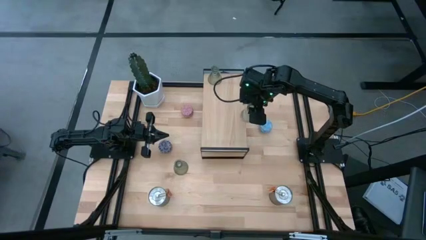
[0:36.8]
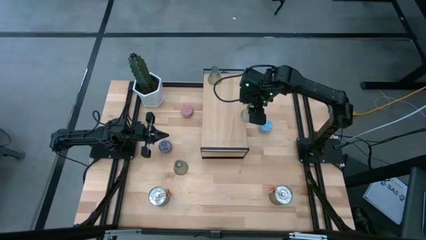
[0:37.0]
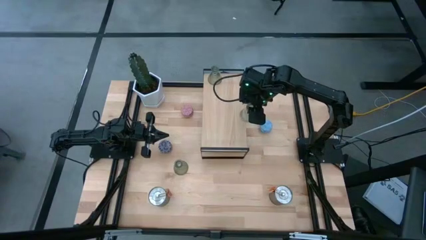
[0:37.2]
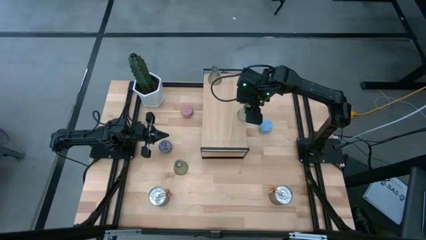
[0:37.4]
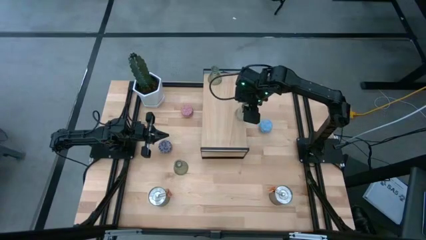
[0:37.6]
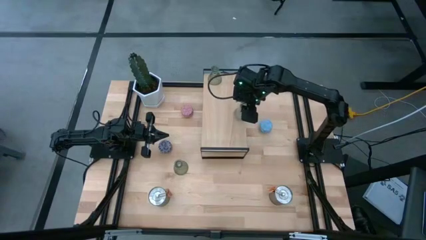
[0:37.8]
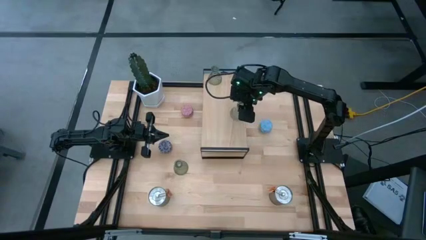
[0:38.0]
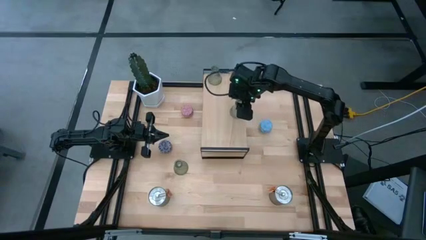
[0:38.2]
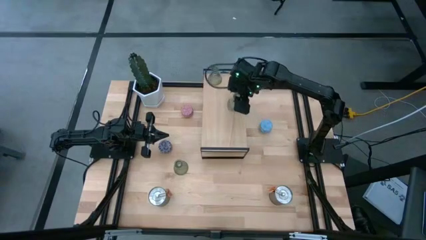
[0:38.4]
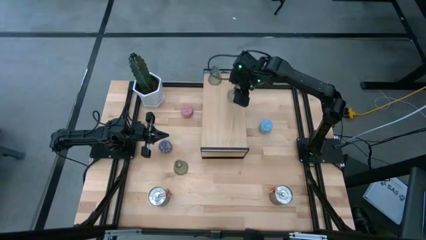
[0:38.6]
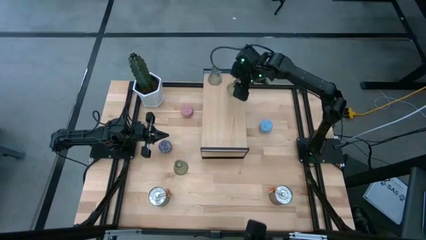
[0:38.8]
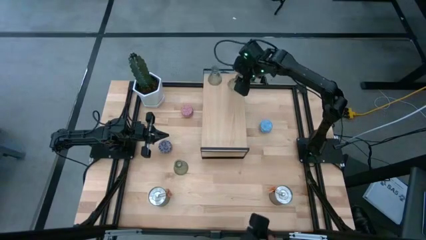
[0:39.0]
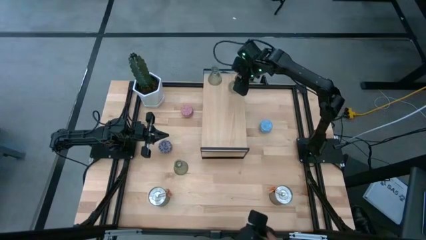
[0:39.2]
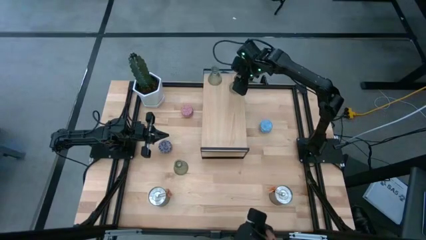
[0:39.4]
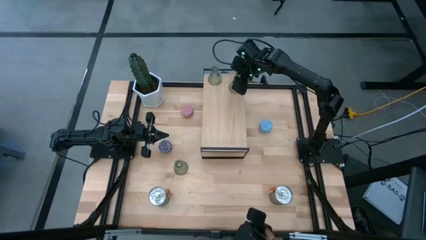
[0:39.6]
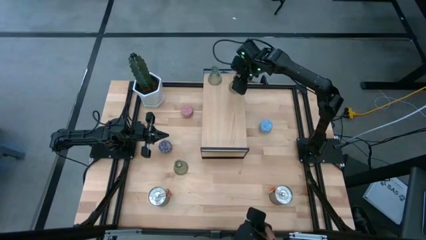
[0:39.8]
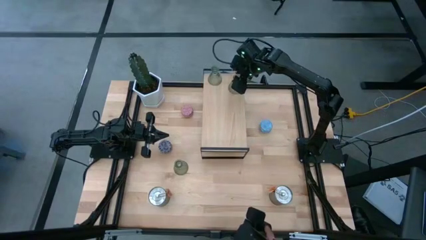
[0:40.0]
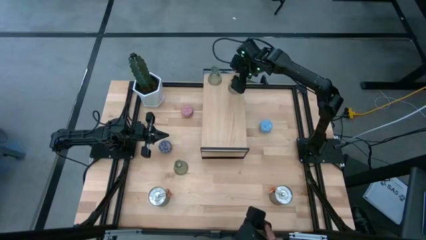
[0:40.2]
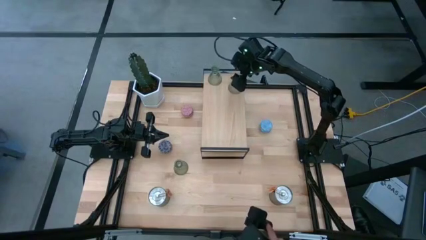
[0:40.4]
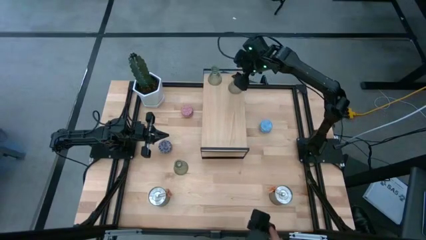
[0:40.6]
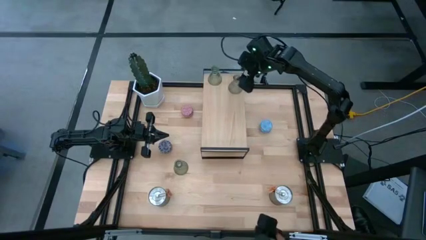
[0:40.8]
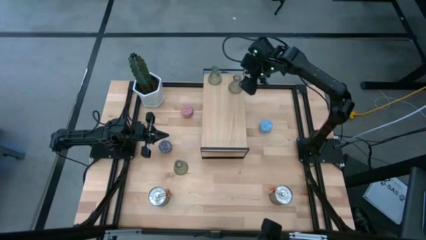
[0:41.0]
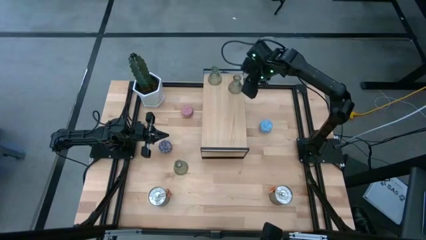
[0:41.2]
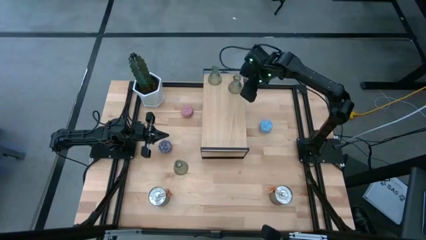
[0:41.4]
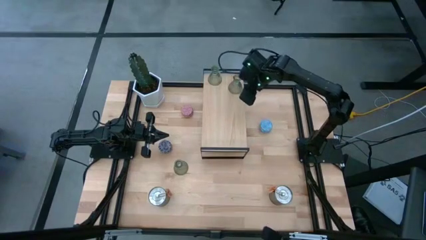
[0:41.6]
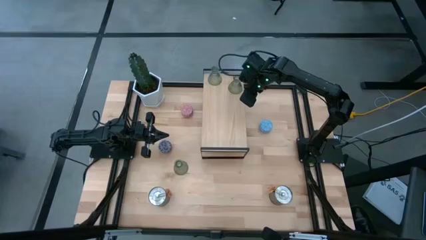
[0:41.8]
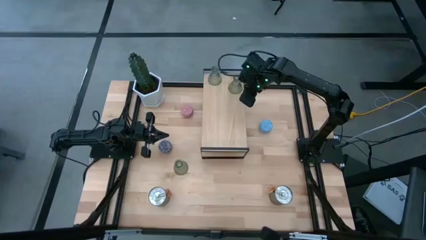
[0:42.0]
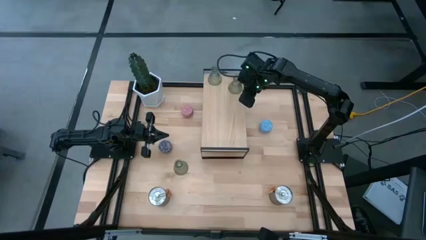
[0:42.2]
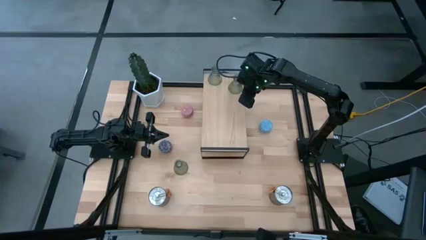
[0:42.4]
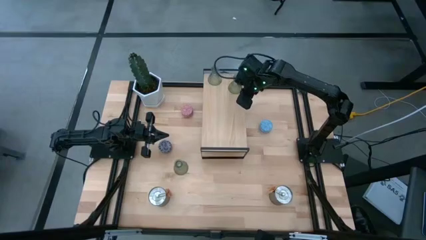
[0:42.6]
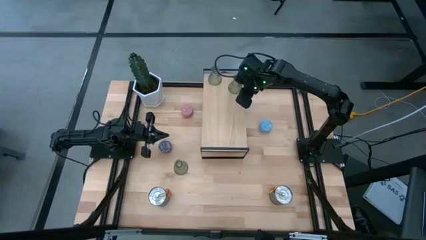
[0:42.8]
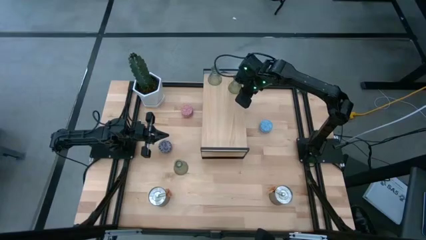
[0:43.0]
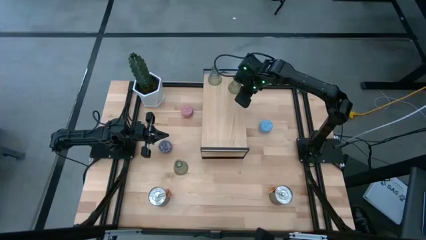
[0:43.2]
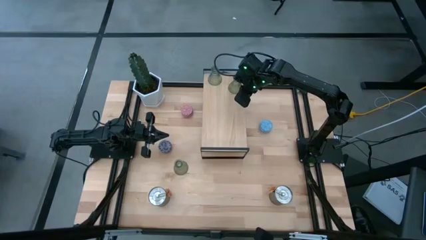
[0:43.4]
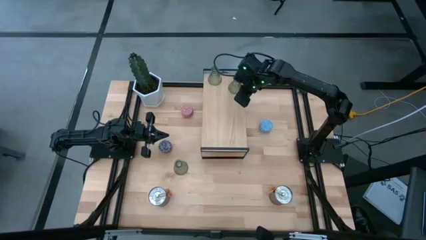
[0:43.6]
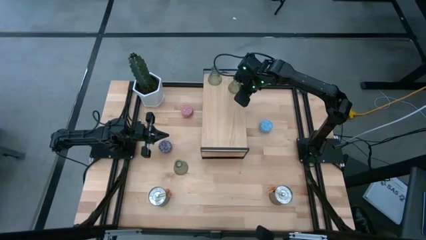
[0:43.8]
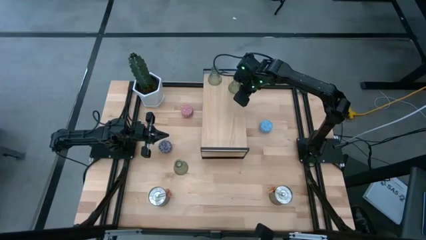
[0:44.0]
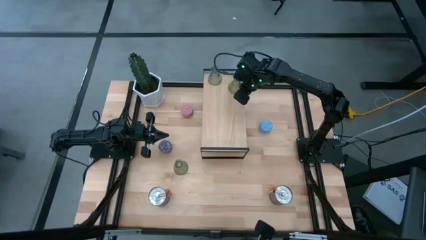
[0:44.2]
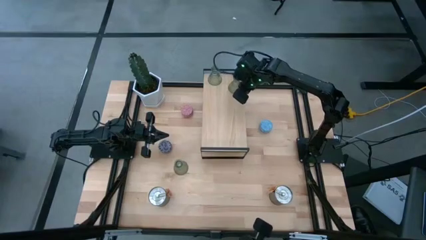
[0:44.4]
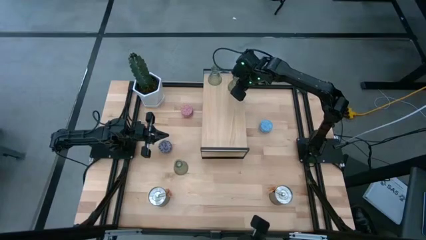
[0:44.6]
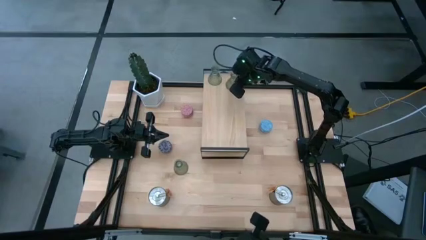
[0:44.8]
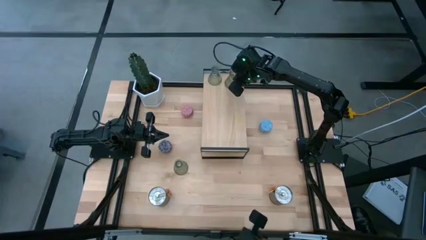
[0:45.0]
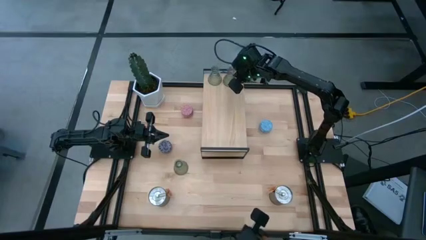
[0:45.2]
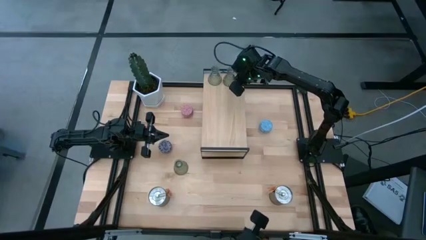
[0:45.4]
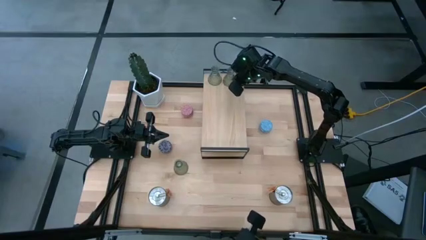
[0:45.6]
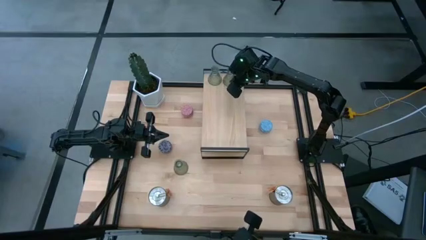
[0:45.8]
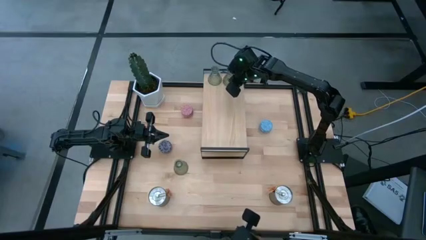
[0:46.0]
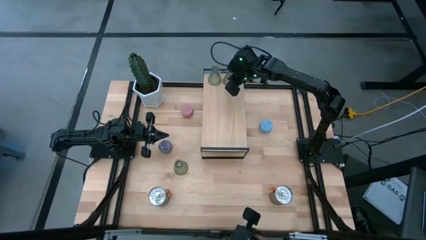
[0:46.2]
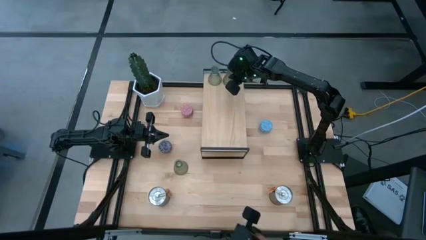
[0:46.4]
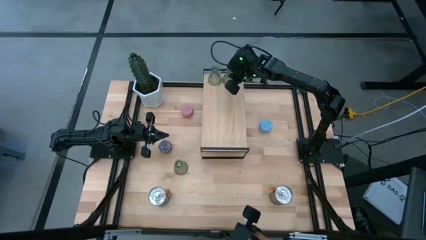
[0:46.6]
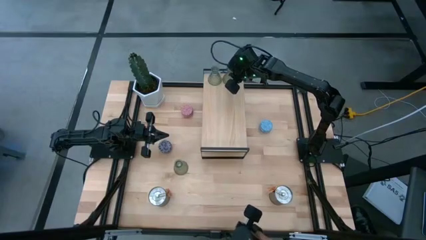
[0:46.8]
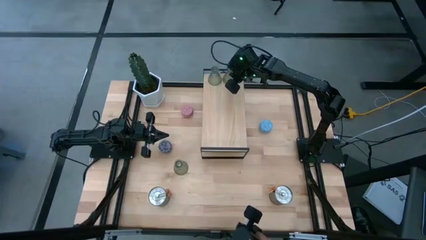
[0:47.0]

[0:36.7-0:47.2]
Task: Pick & Place candle stick holders
Put the right transparent candle holder on the shelf

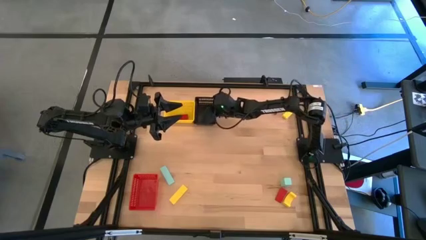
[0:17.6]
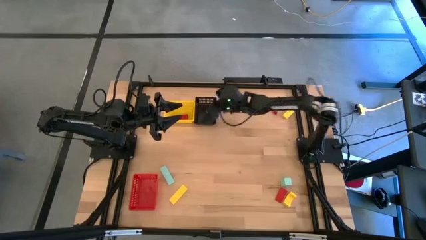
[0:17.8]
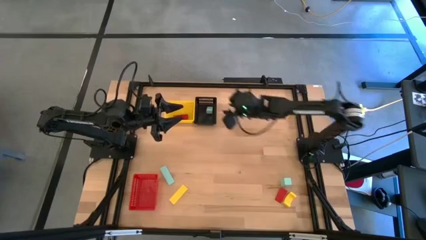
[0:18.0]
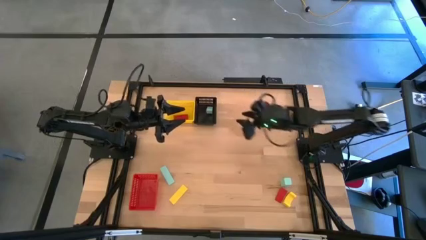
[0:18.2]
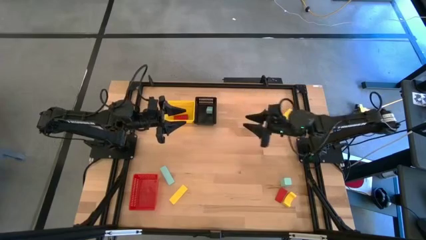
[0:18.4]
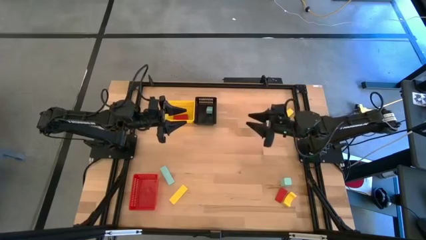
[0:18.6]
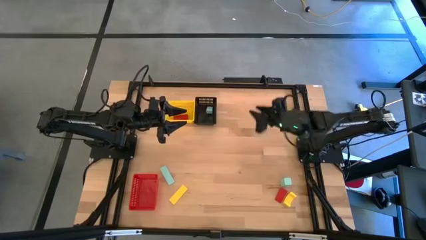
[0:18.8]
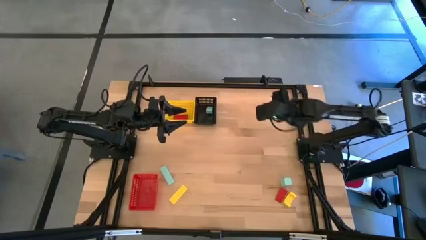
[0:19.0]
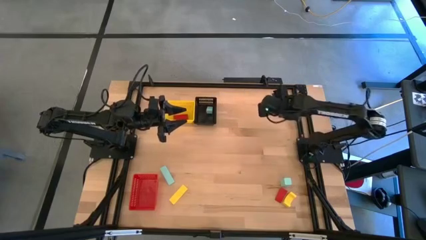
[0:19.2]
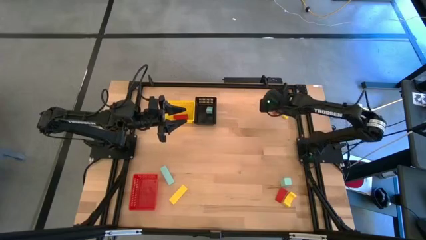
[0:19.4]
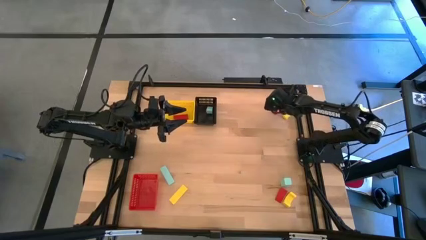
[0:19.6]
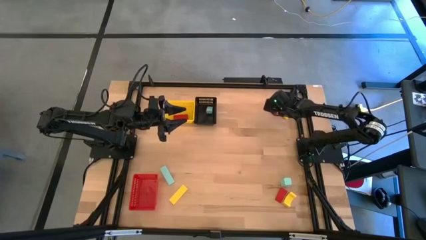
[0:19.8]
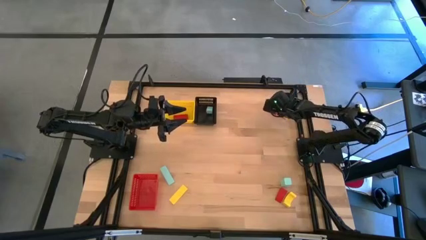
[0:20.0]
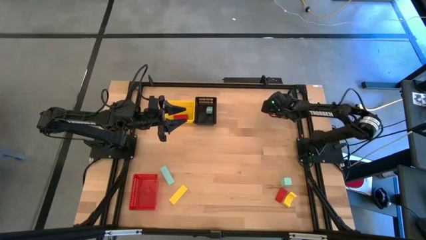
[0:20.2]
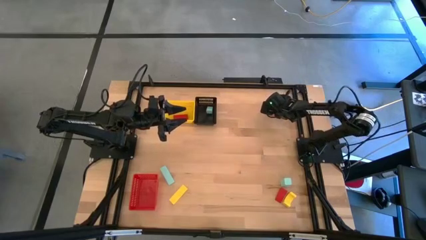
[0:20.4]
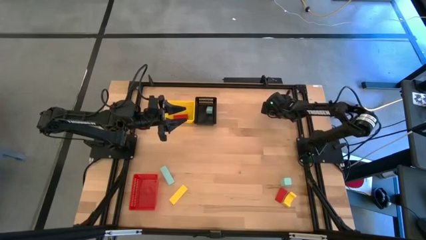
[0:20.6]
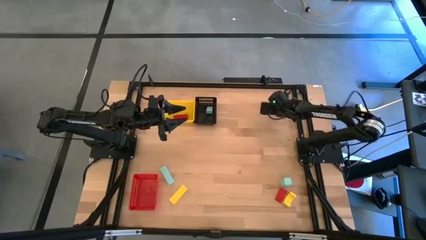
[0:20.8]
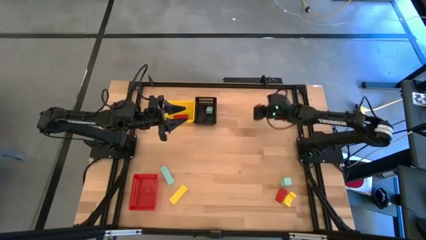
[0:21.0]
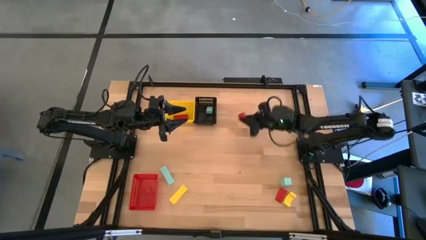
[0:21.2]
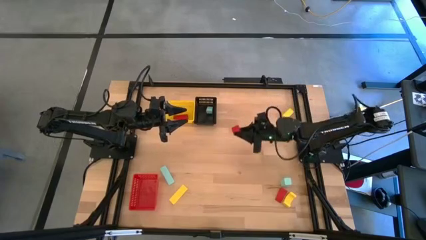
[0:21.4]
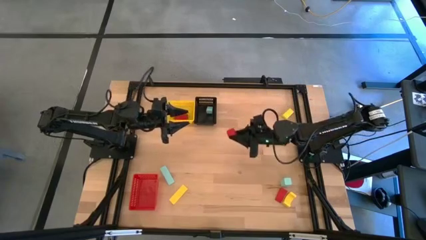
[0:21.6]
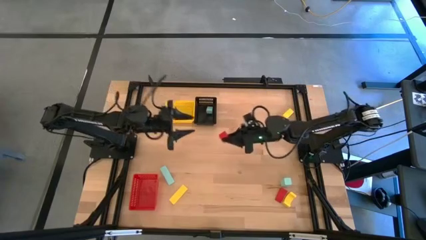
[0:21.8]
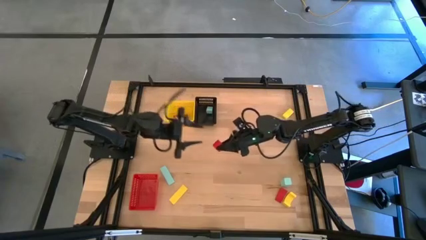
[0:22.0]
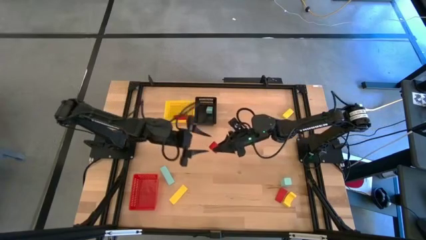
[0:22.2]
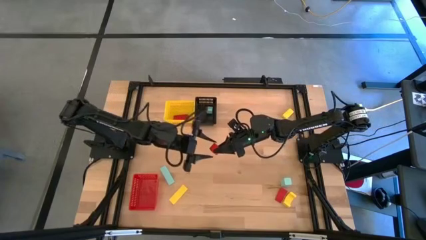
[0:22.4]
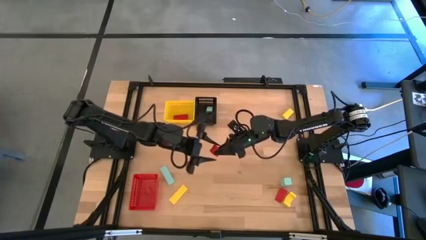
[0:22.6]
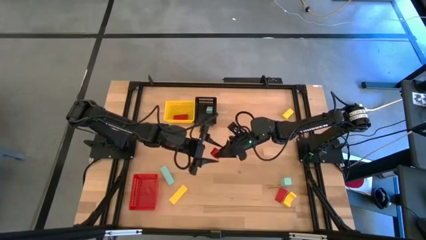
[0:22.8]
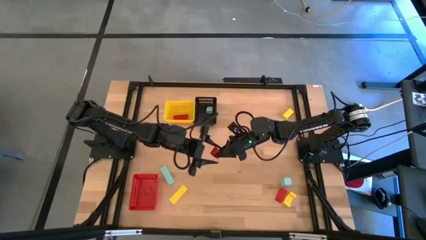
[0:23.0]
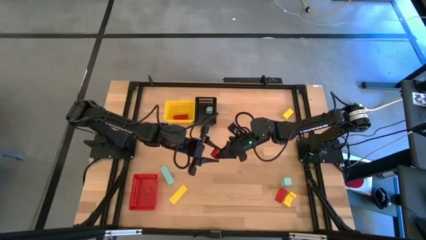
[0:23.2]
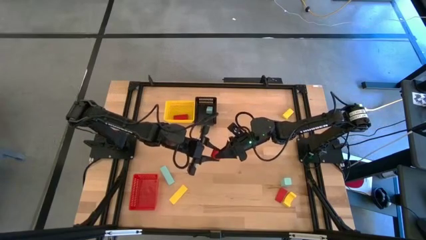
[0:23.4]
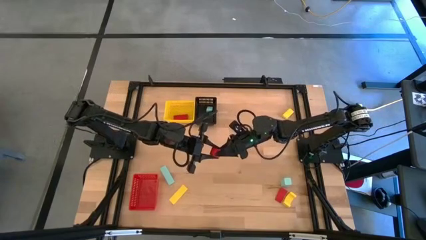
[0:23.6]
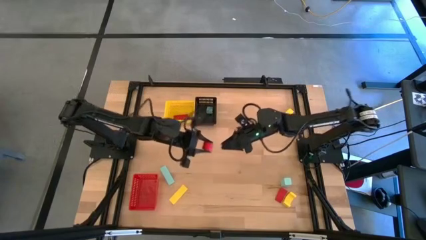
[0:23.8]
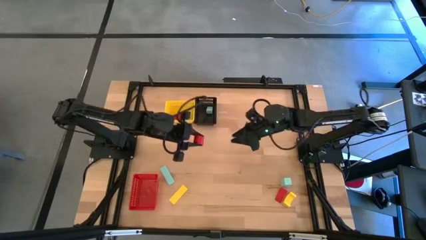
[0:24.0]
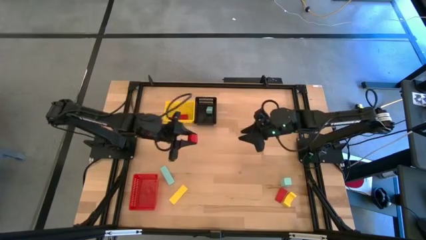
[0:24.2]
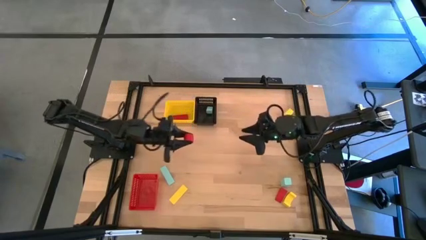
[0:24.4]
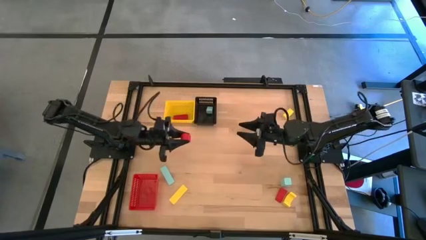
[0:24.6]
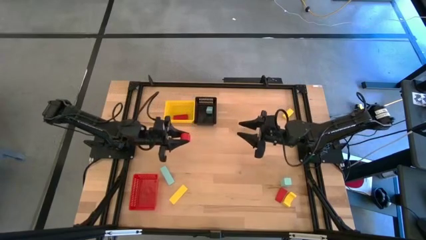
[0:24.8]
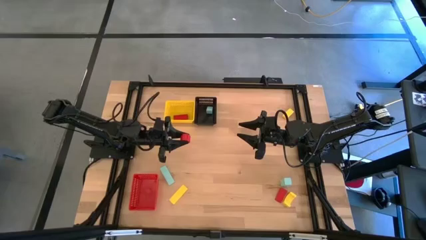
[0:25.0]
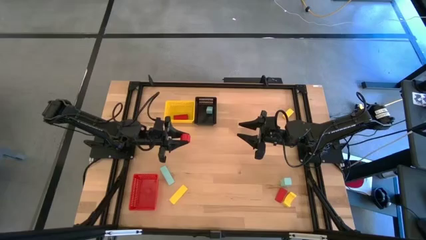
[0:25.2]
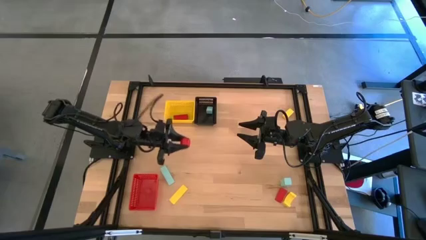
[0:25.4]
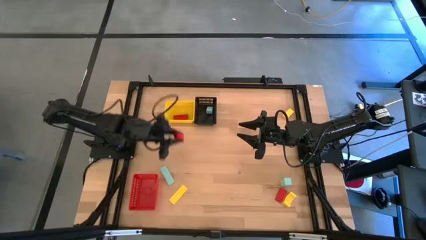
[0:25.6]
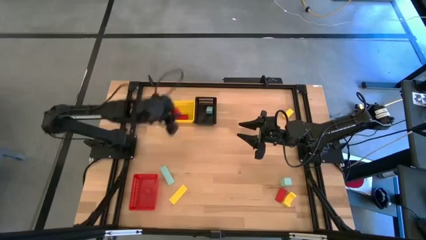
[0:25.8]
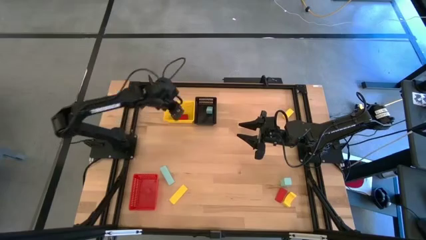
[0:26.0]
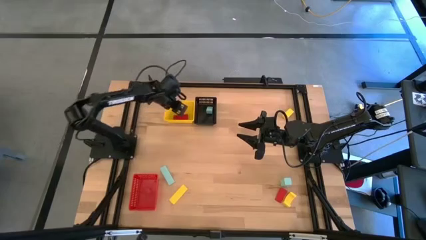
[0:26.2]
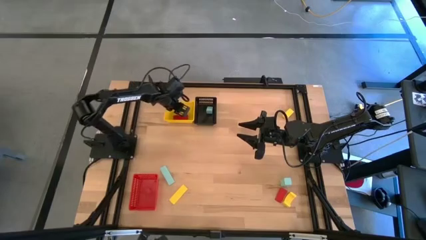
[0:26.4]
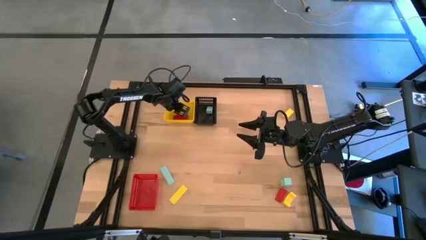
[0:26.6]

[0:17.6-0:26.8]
Task: Sort & place blocks by color
Put the top red block into the yellow basket
